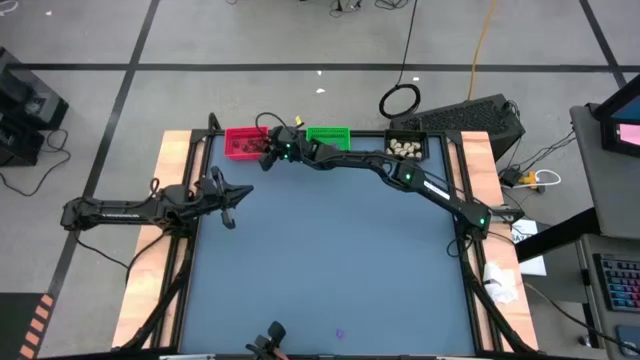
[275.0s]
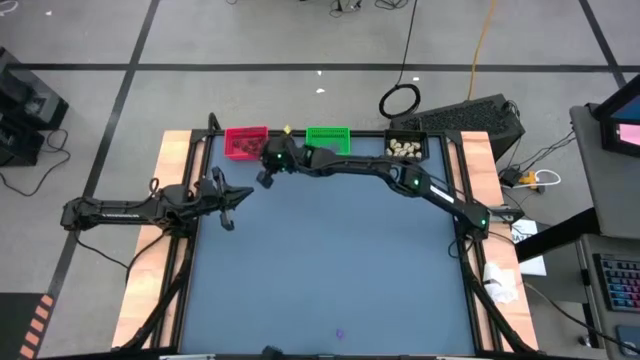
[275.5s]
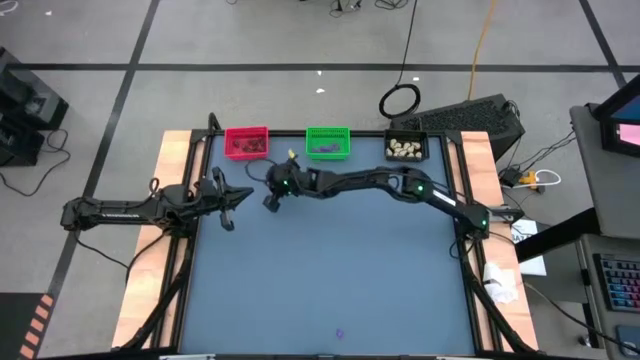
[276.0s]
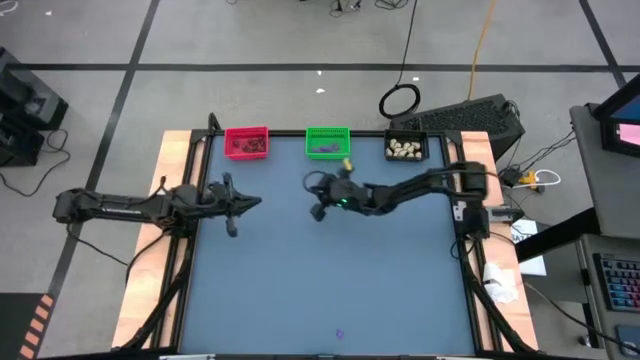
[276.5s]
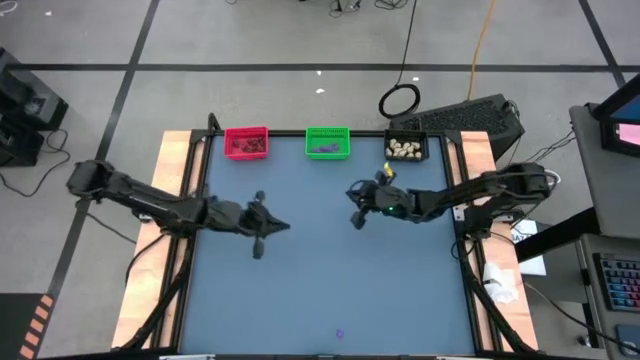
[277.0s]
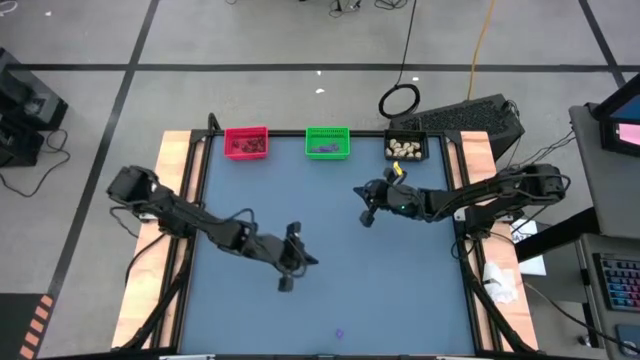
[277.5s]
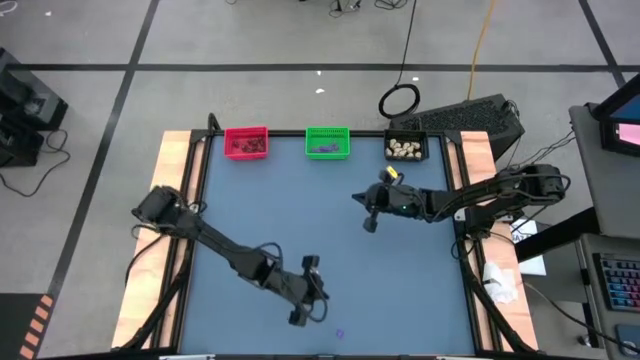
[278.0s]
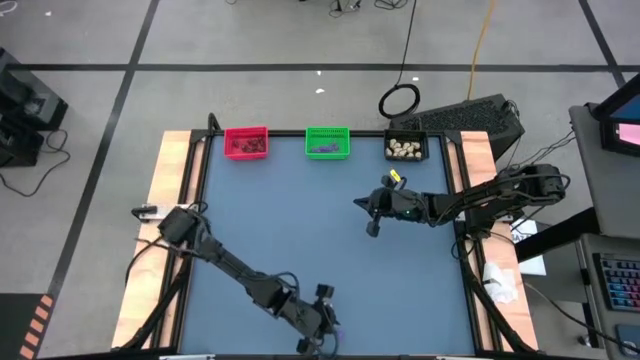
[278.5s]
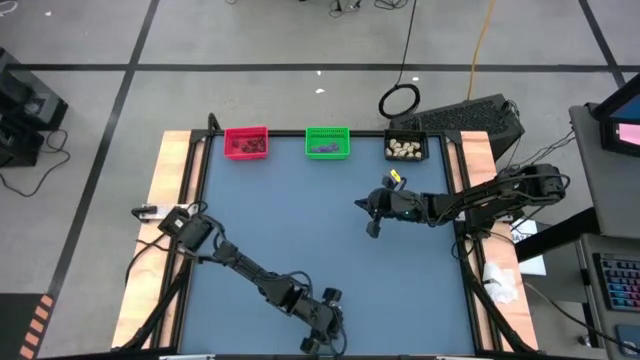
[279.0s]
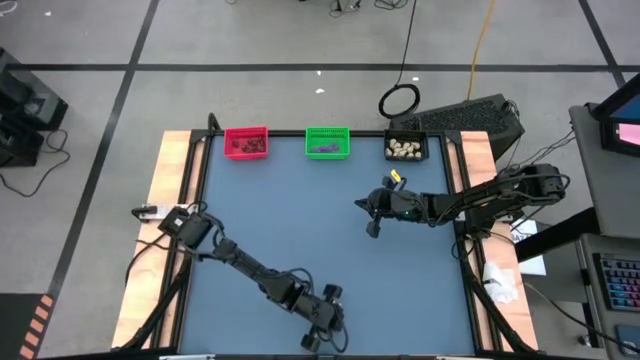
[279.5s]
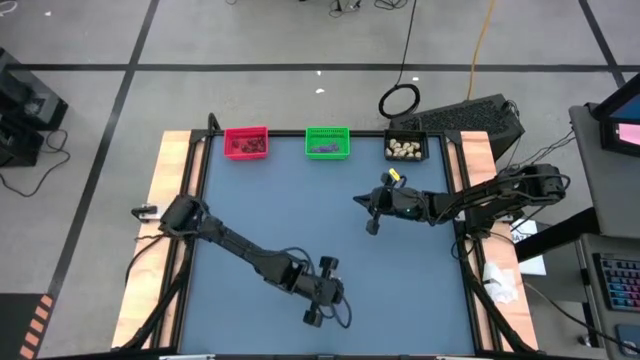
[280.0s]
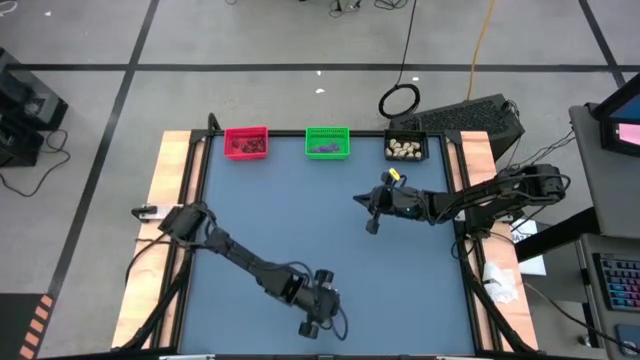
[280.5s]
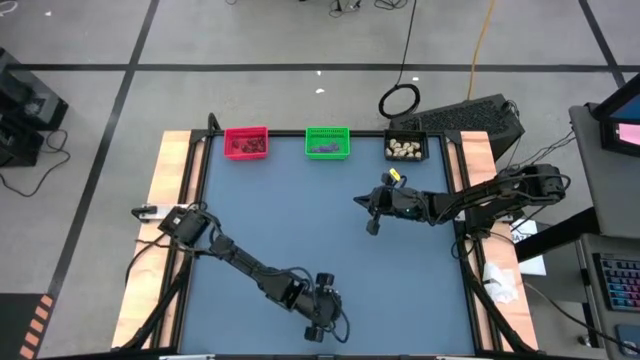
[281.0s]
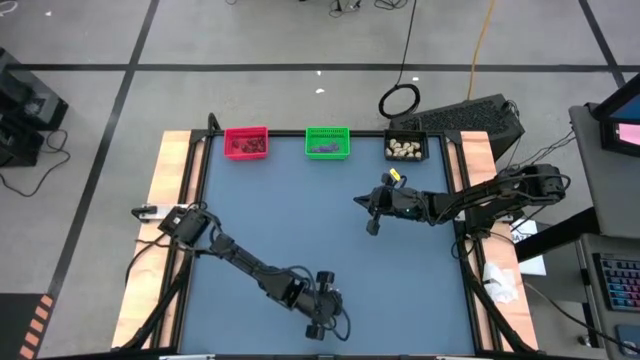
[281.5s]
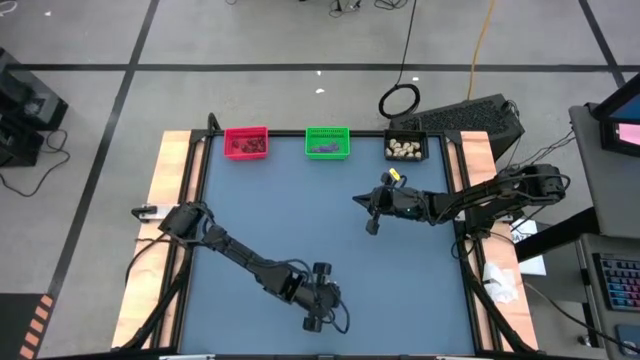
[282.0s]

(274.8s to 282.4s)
Task: Sort Halloween decoration
Put the purple spider toy into the green bin

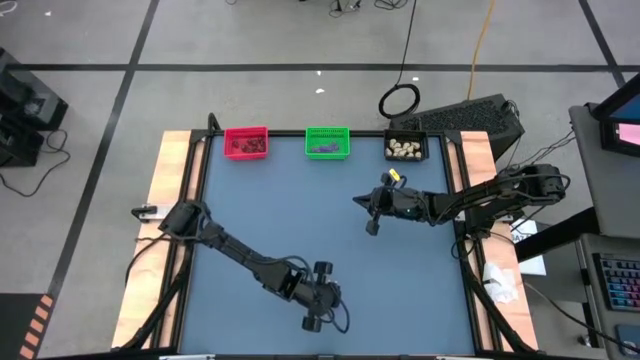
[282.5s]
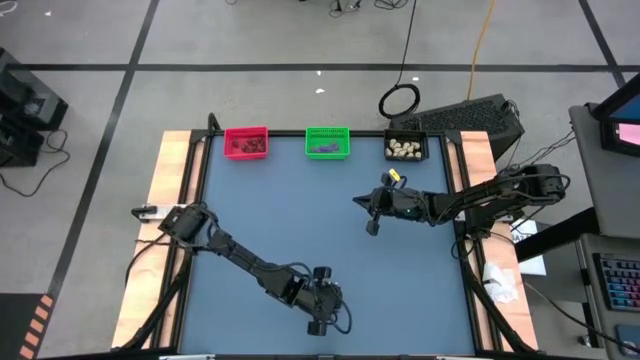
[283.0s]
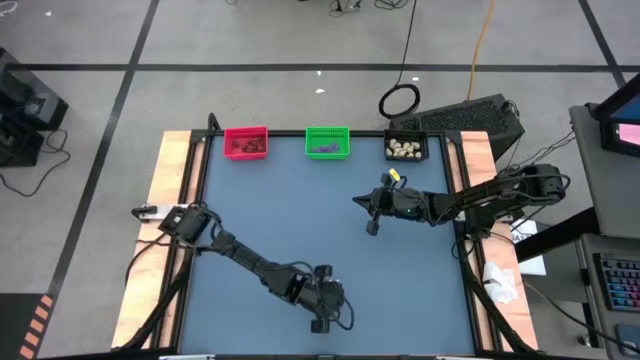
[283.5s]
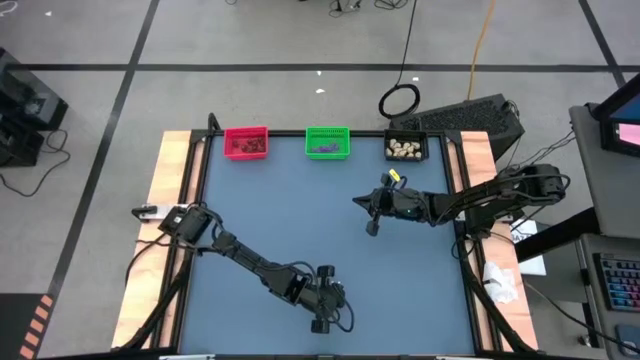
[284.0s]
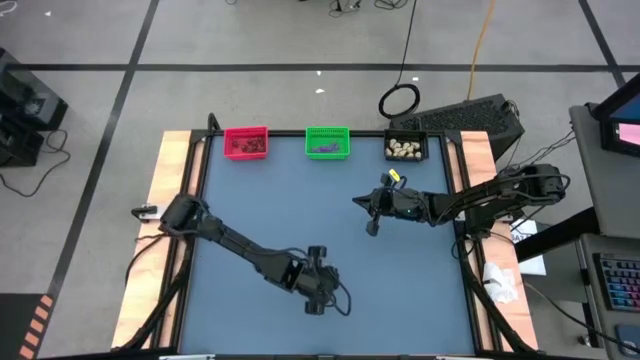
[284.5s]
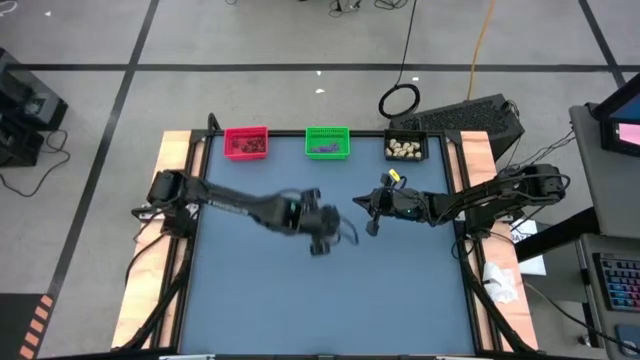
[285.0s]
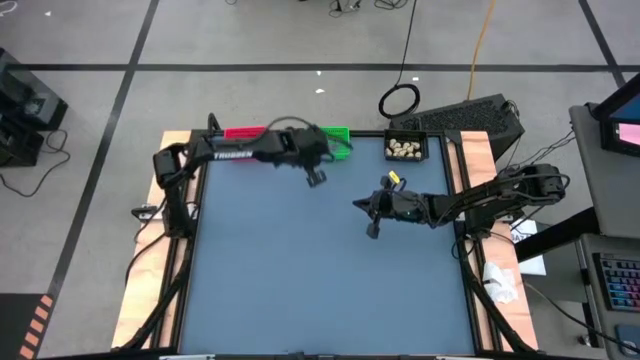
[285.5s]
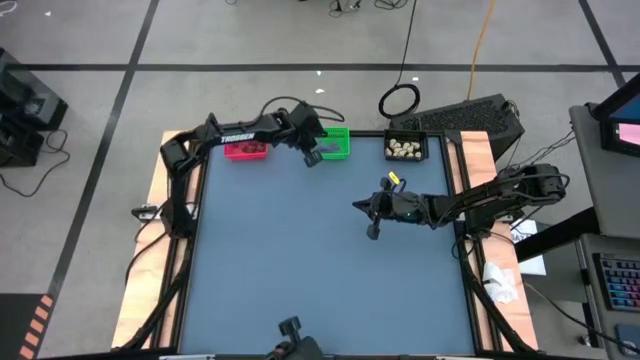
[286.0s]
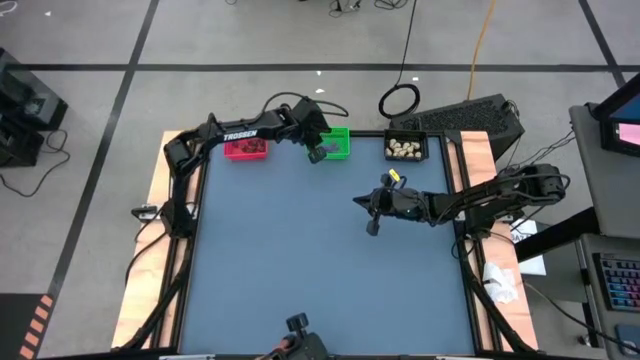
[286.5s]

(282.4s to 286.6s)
Put the purple spider toy into the green bin

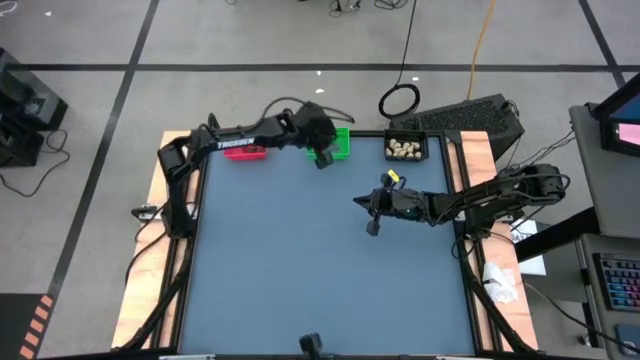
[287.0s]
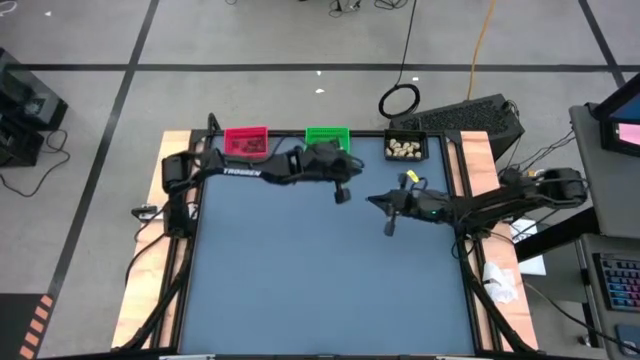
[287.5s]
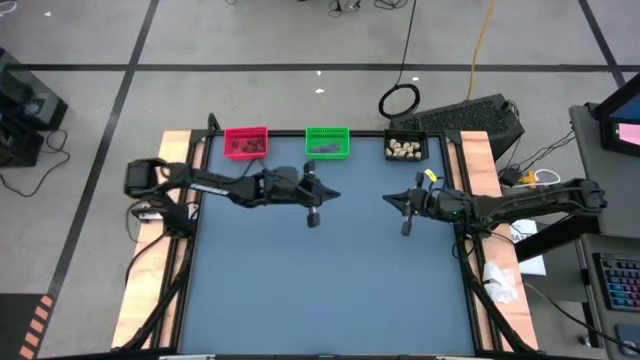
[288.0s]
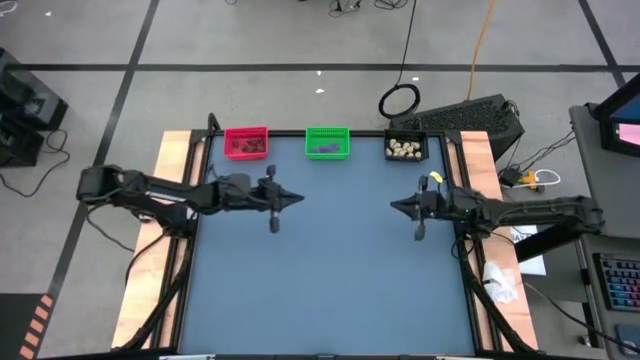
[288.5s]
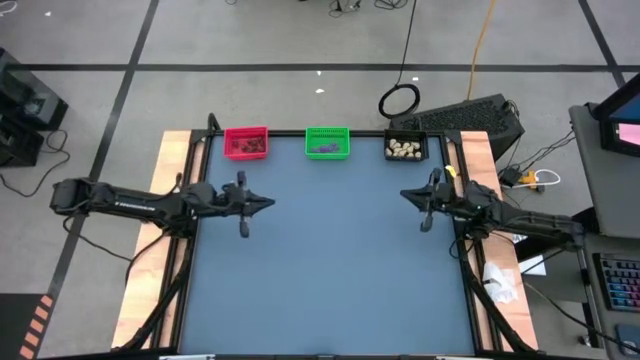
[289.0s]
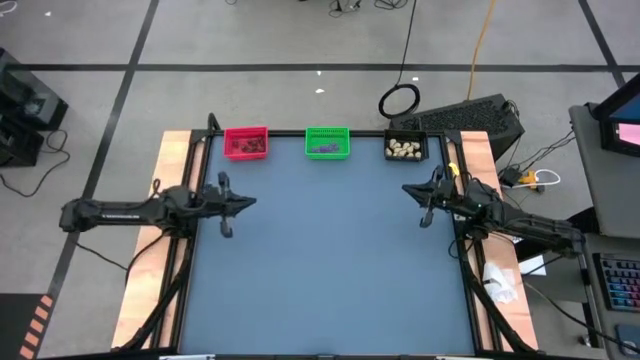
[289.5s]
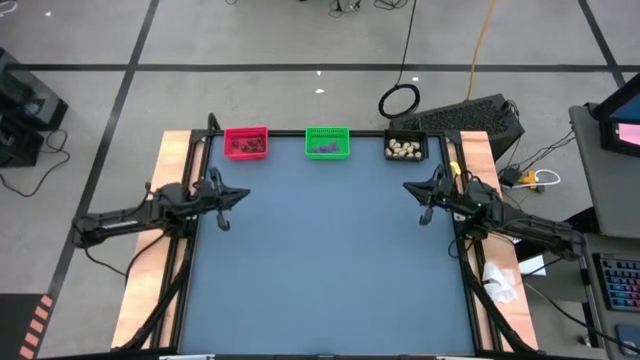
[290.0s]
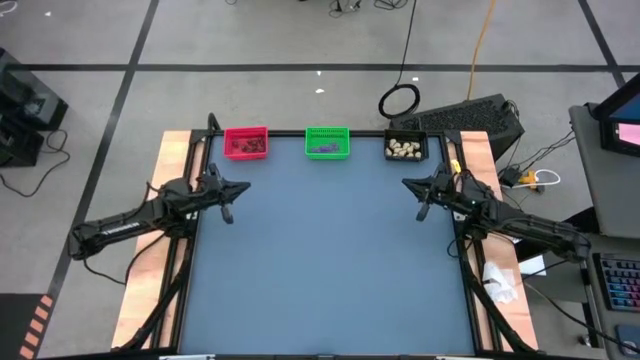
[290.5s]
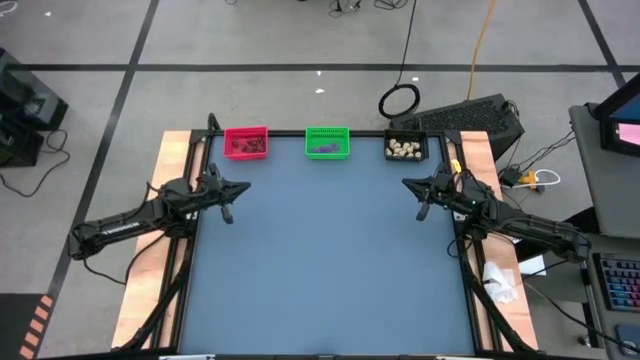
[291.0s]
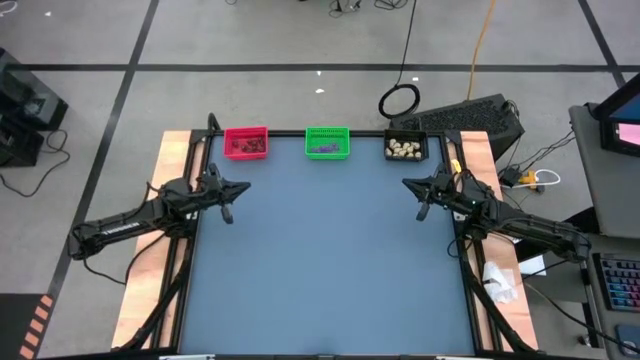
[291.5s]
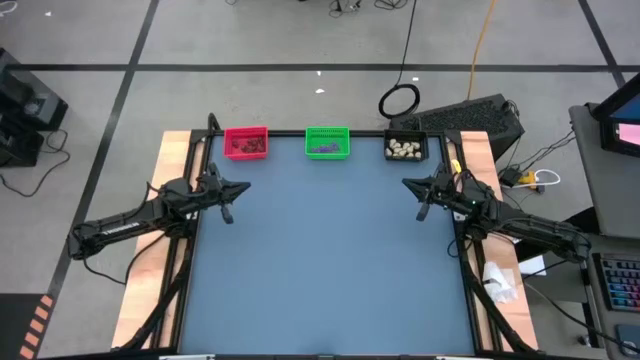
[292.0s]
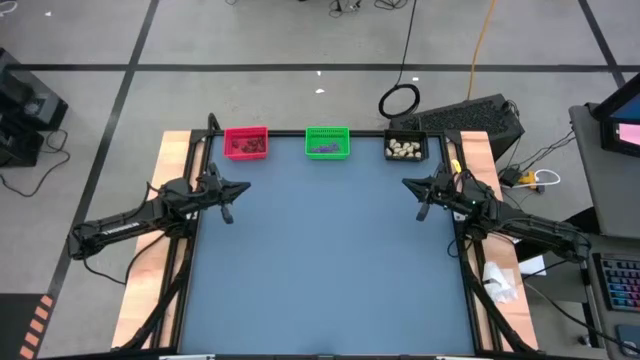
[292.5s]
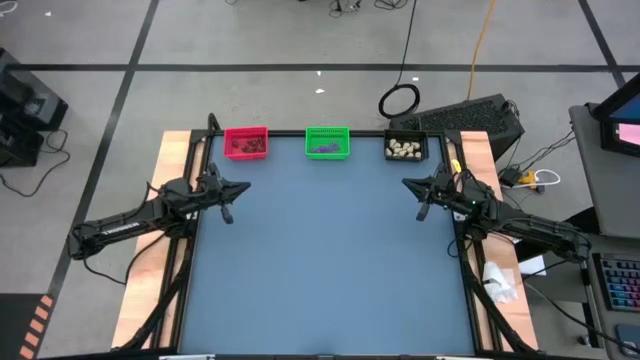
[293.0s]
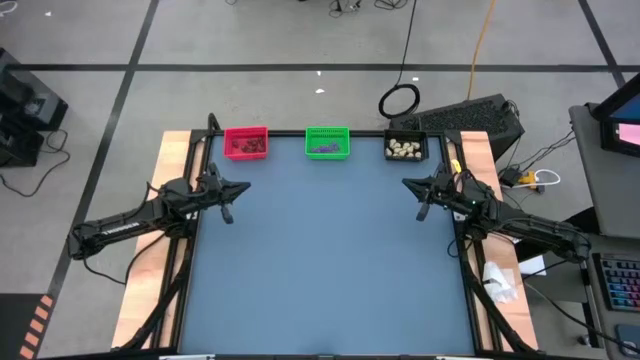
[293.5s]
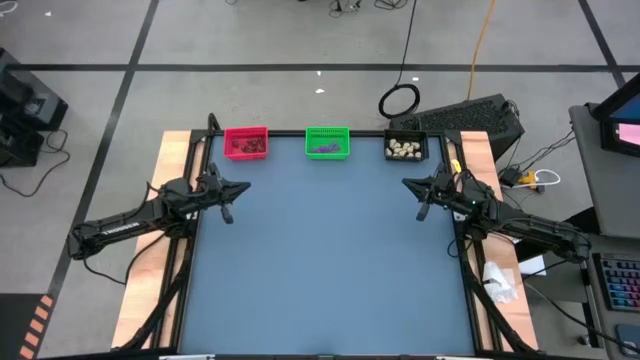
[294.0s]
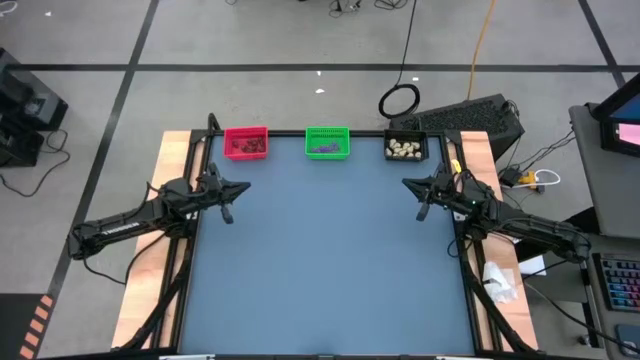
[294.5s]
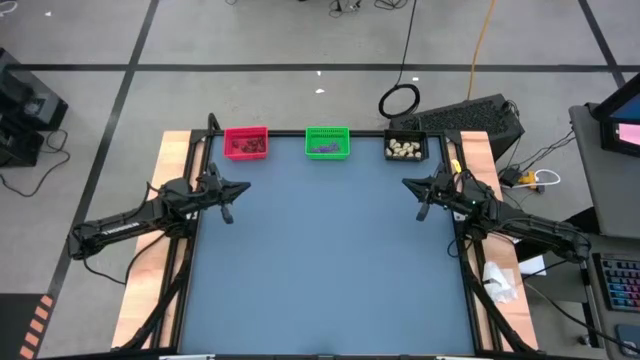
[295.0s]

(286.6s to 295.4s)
Return to Home Position

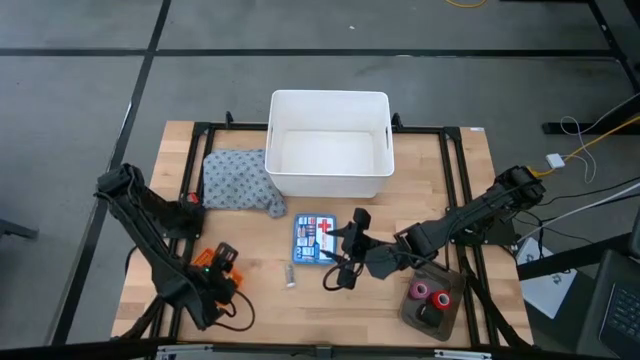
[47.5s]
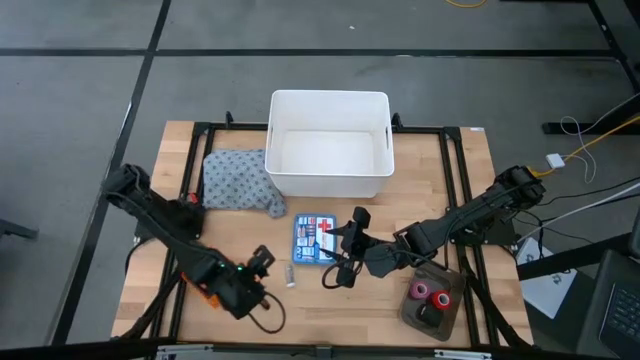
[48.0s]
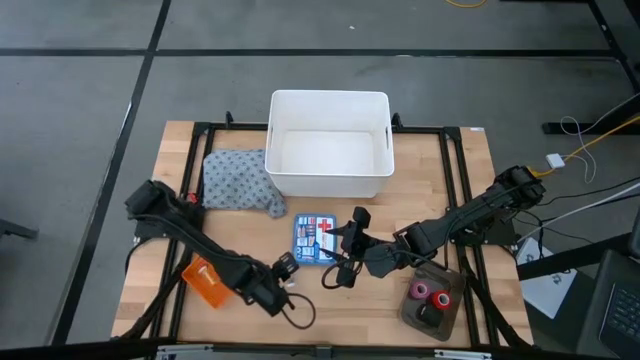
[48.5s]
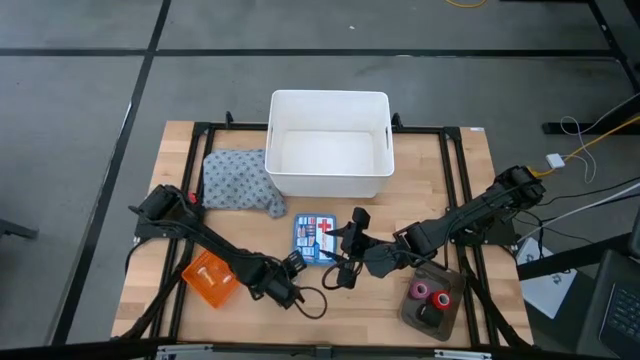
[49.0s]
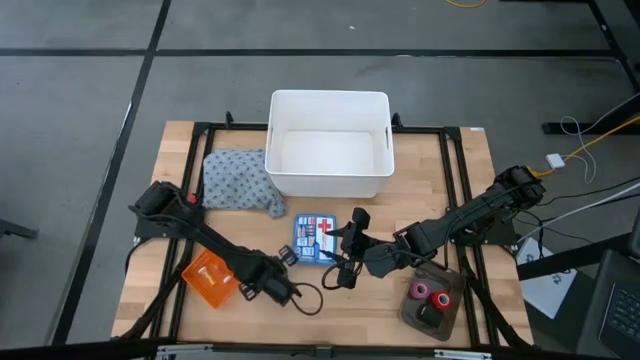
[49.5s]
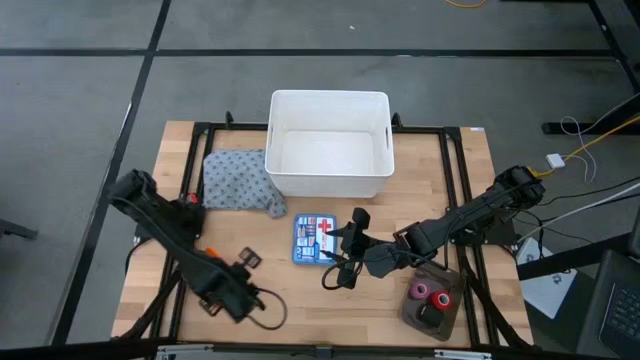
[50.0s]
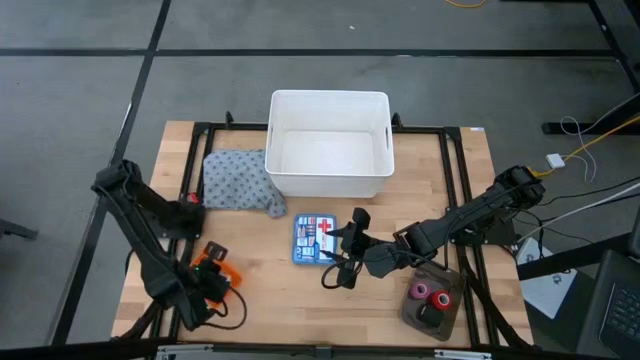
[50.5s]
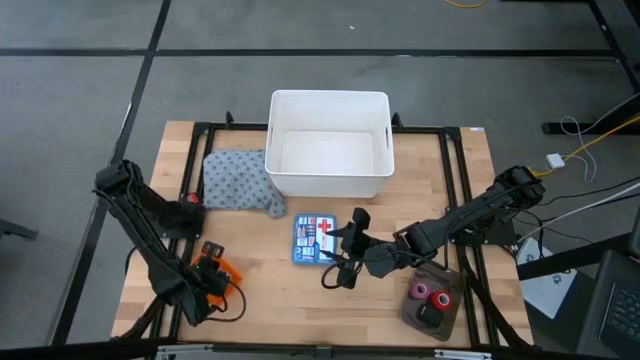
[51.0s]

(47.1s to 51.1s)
Task: Pick & place medical supplies in basket/bin
Put the blue pill bottle into the orange bin
